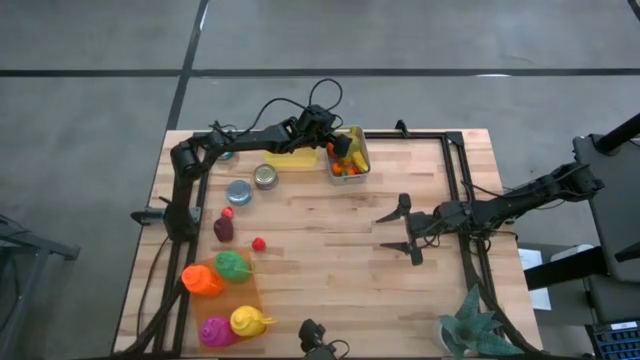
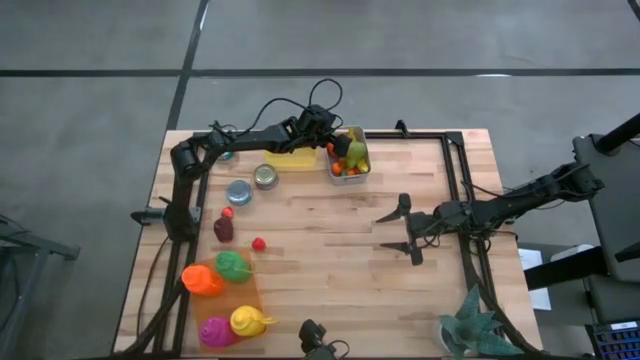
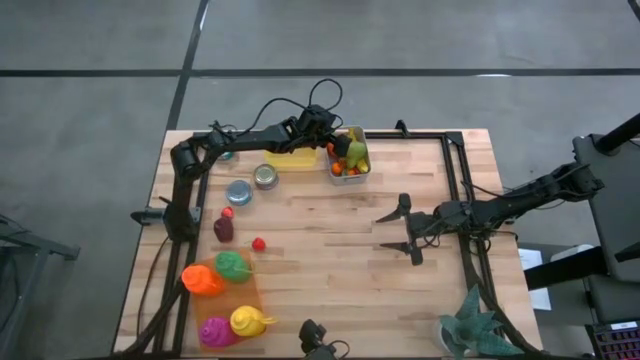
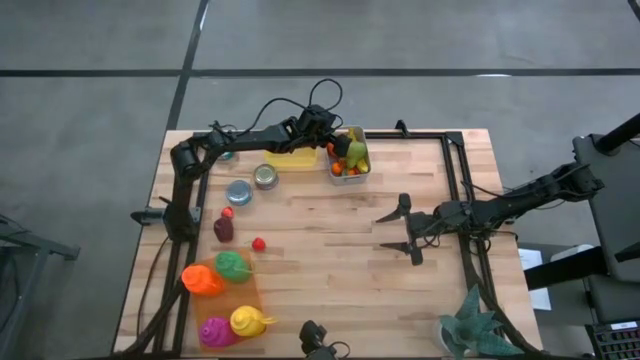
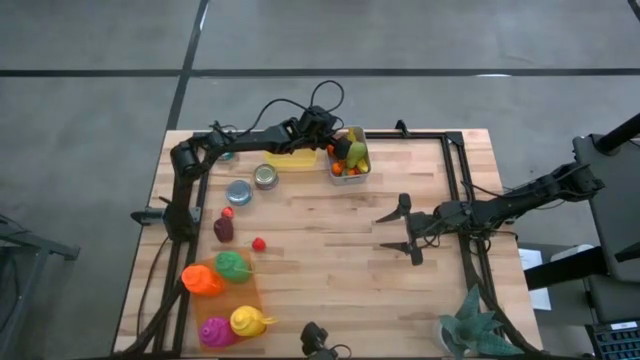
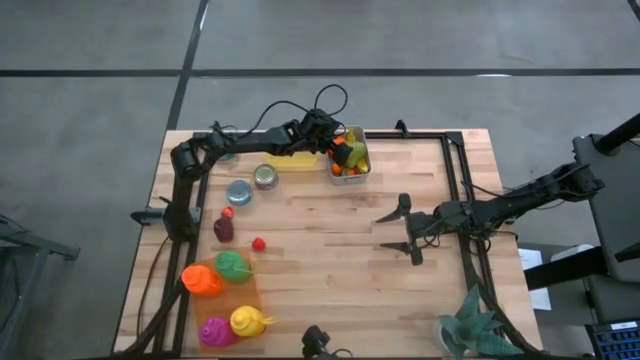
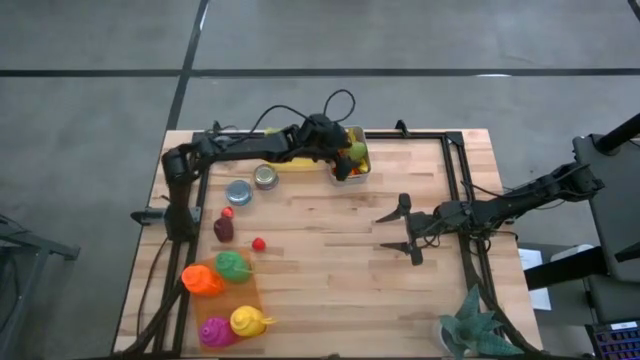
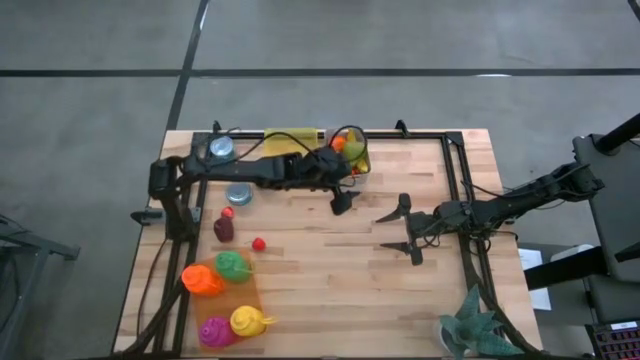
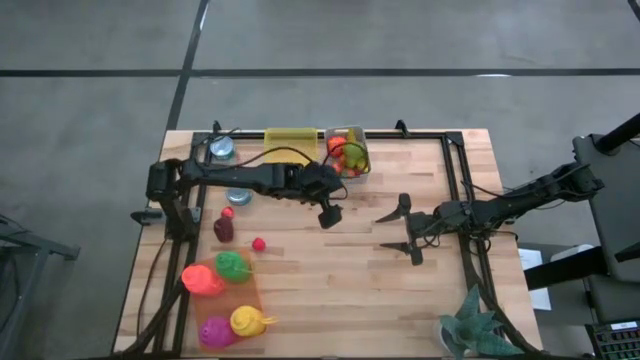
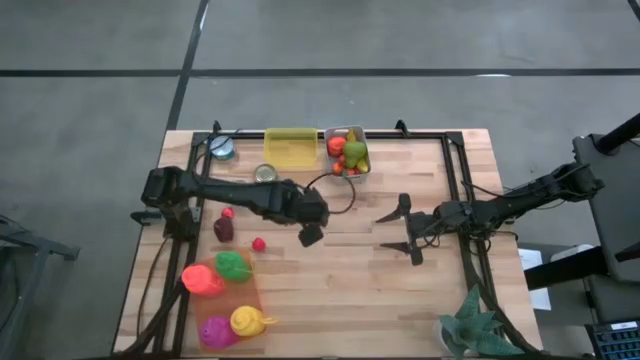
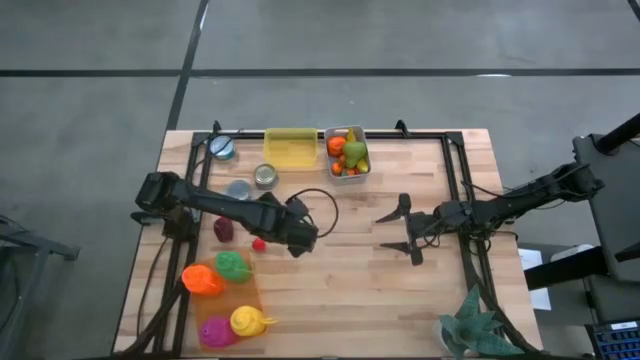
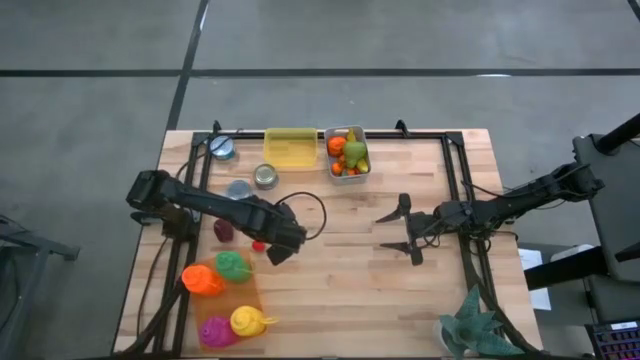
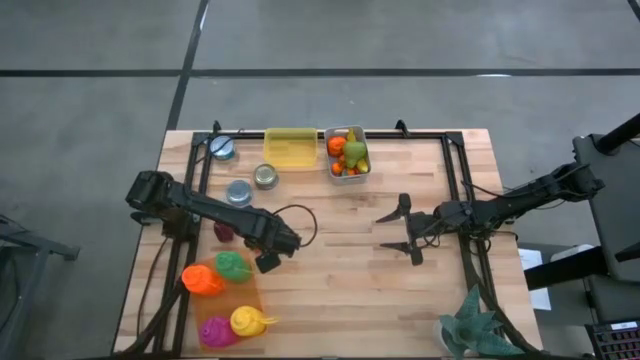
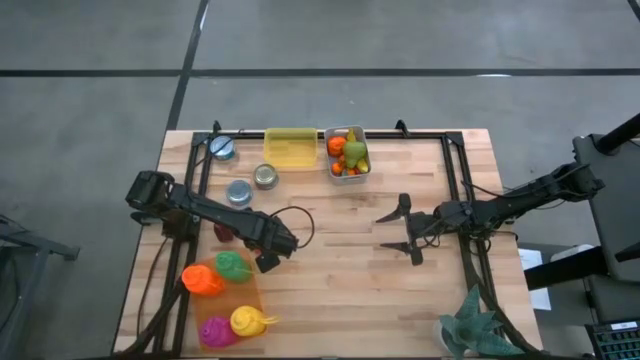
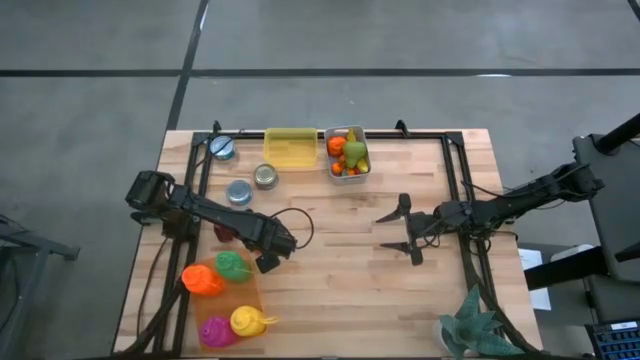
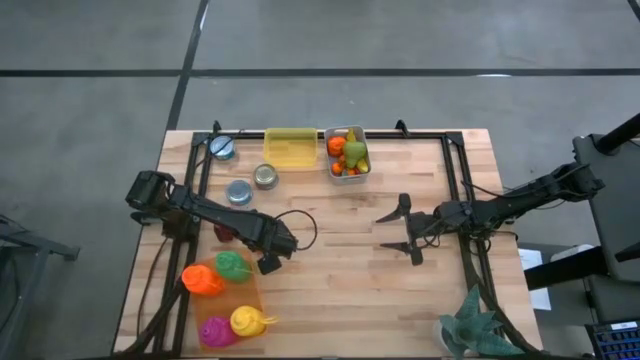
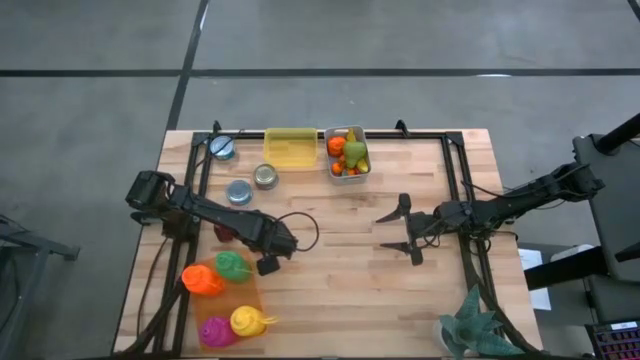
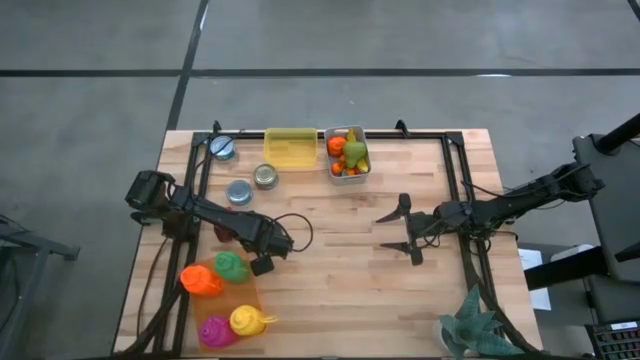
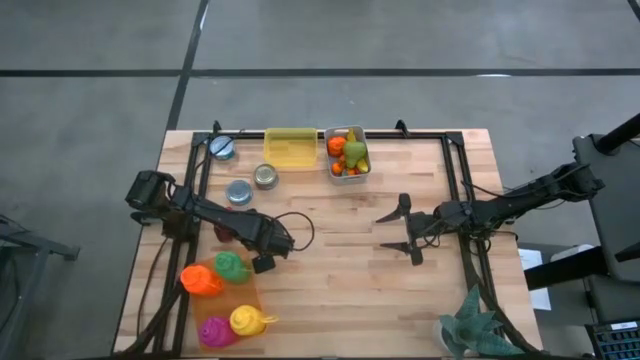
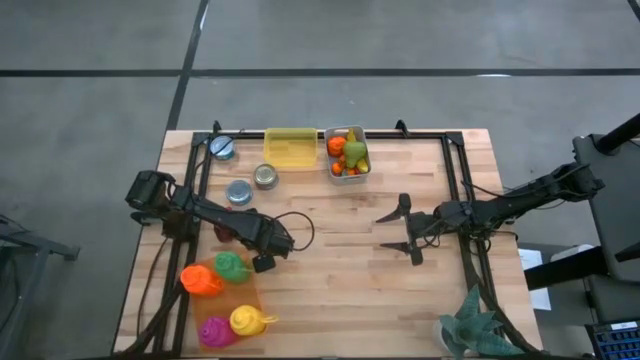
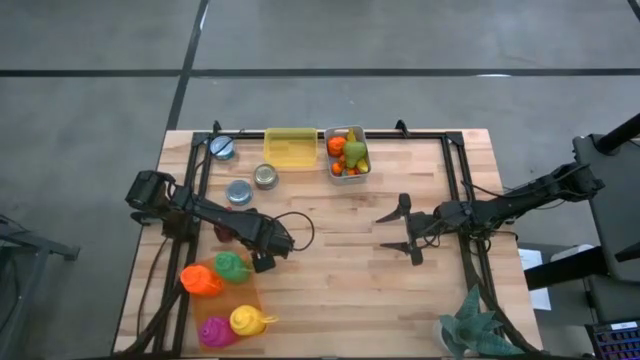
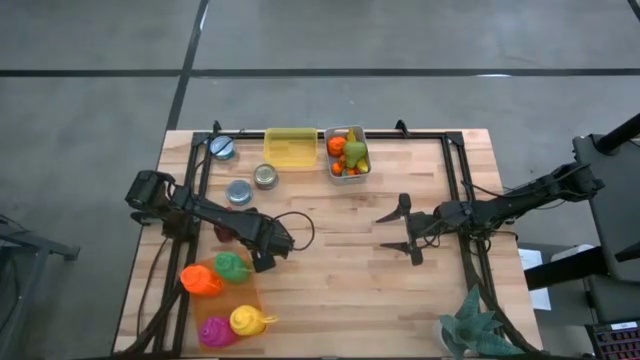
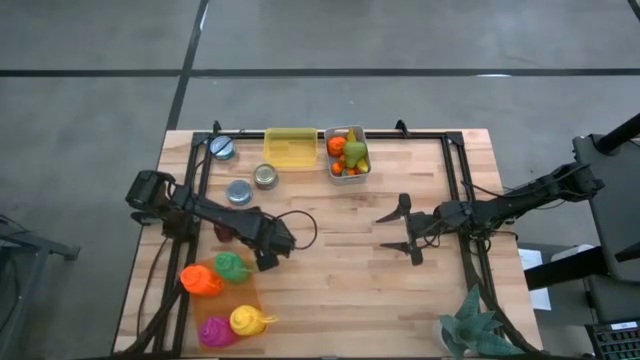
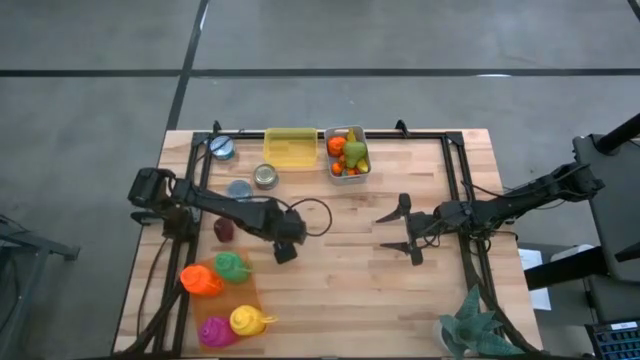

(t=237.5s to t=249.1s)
Task: Pick & Place Food Item
Put the red strawberry into the gray bin

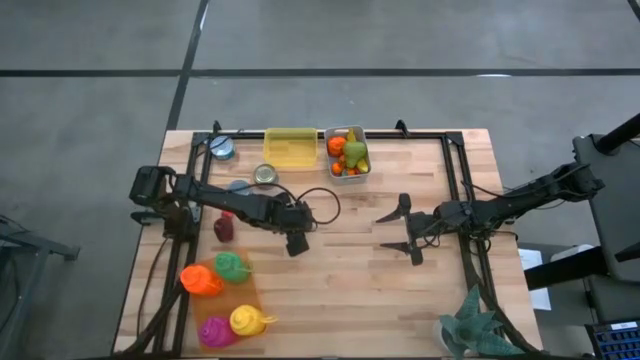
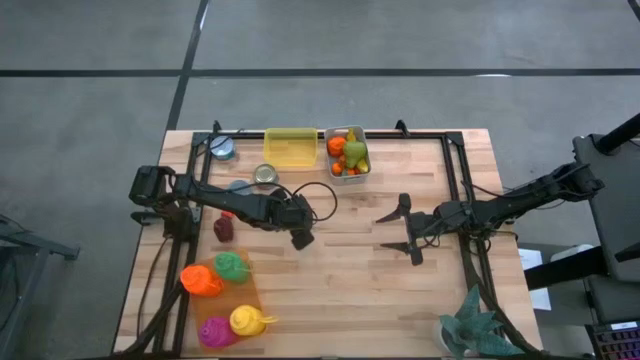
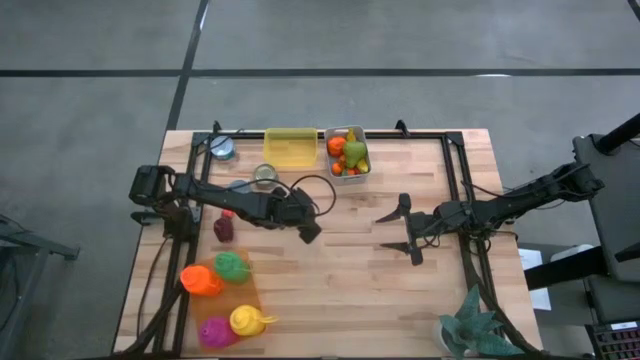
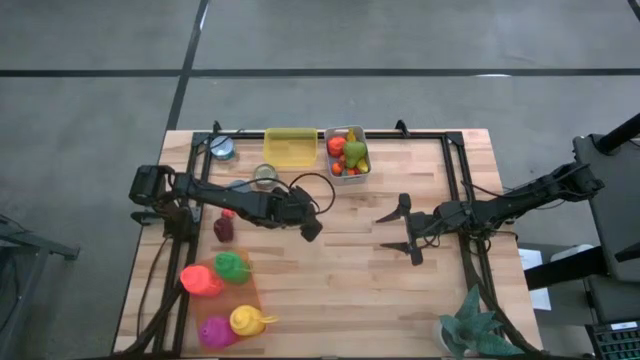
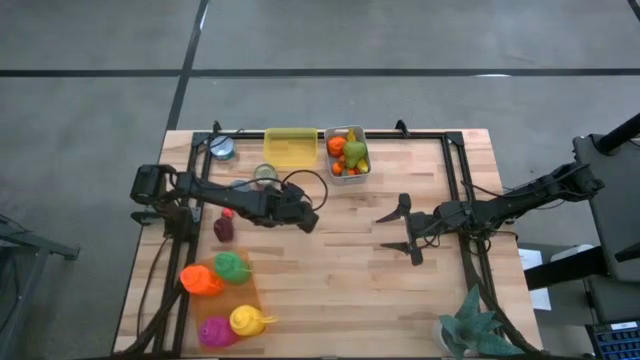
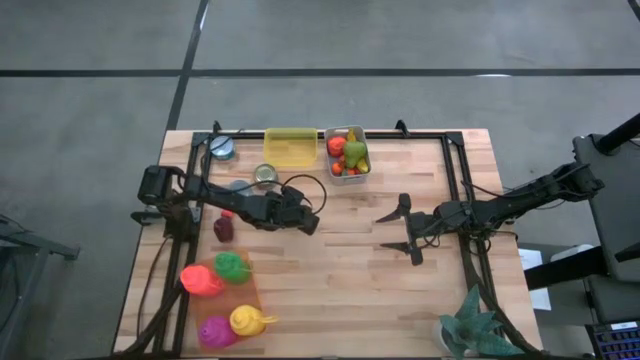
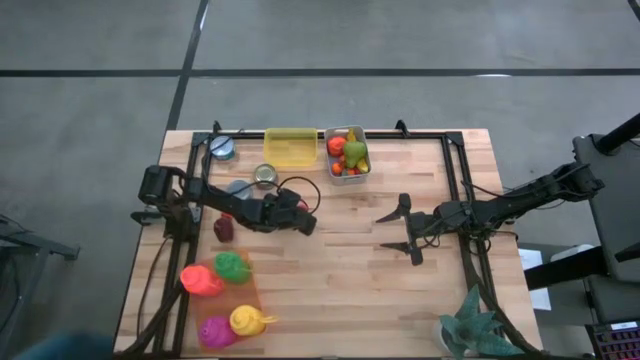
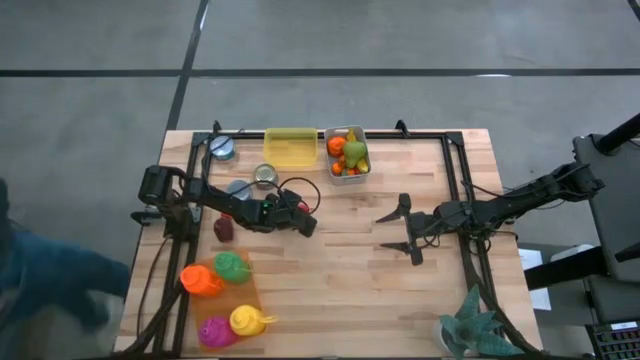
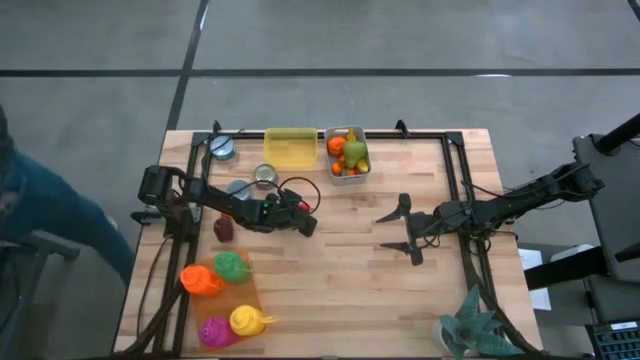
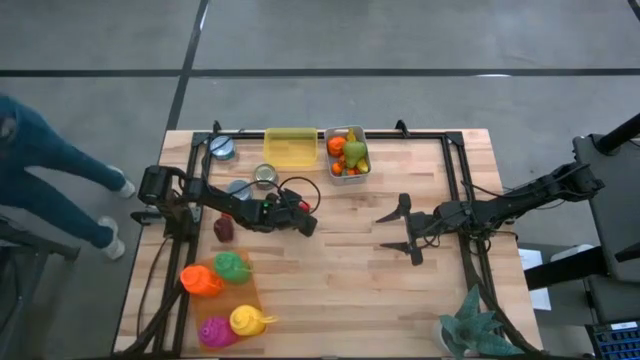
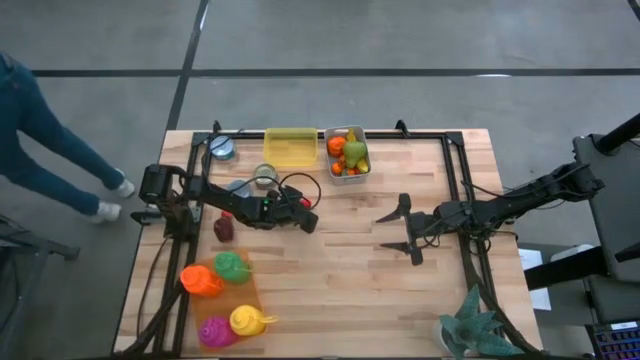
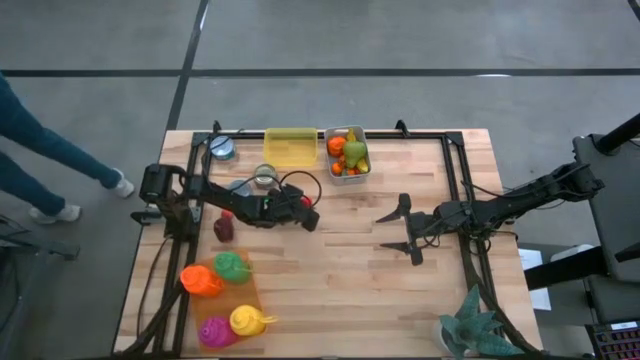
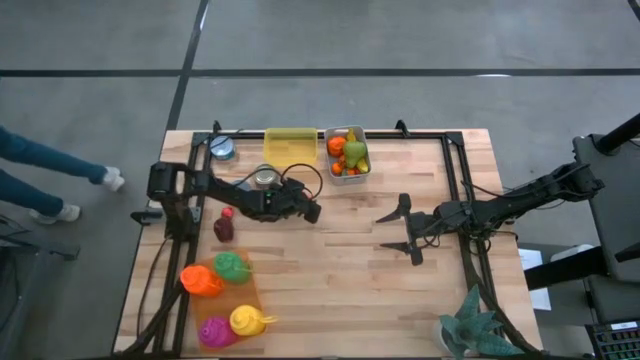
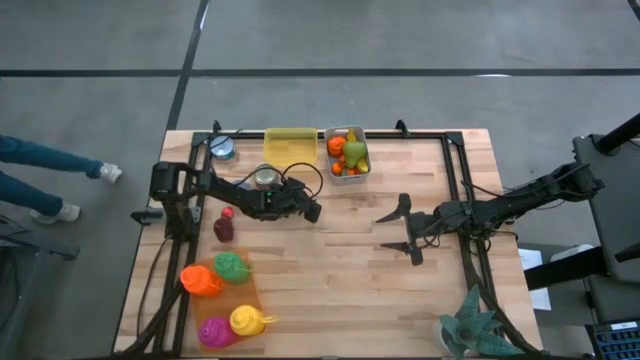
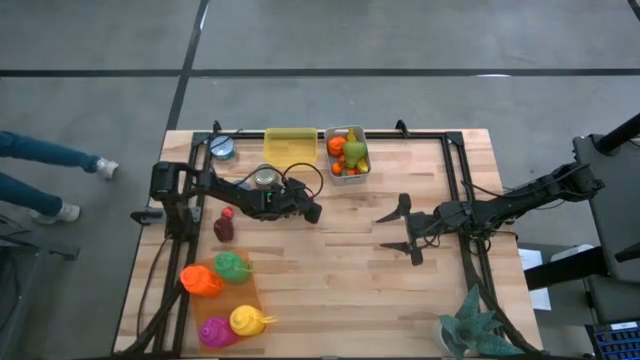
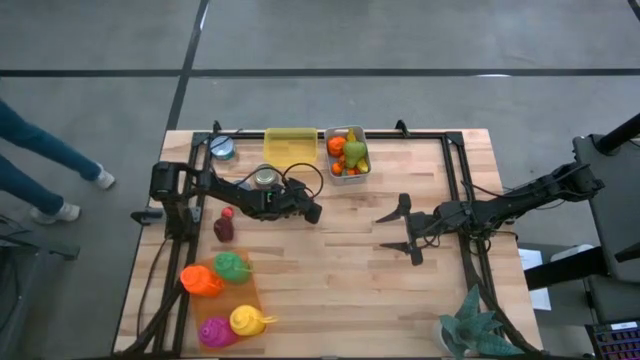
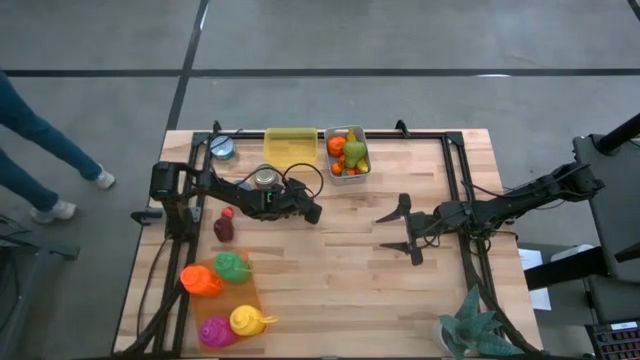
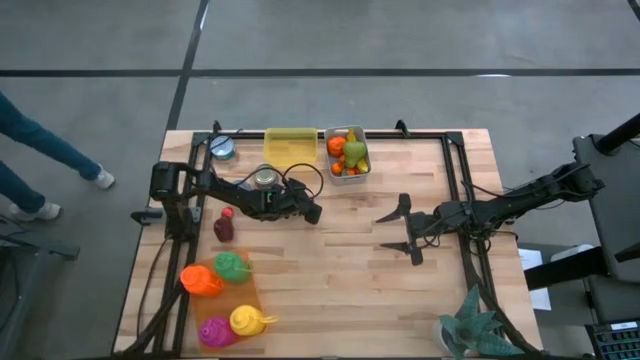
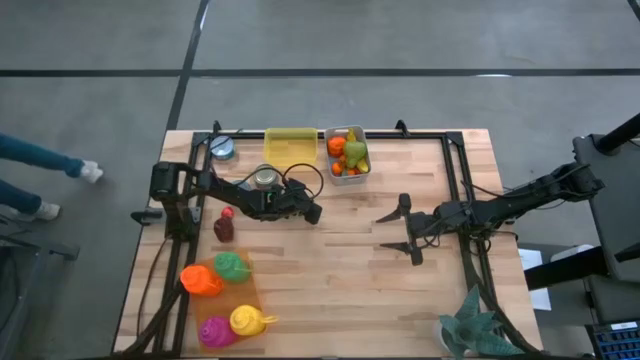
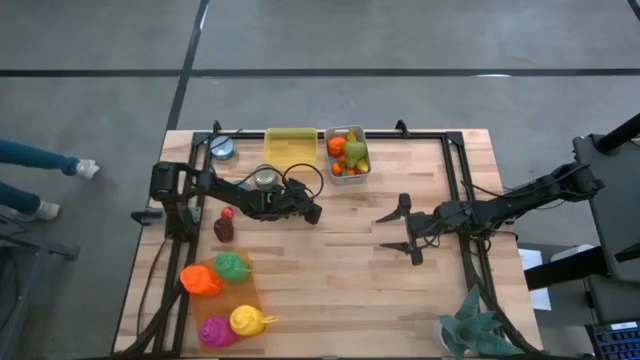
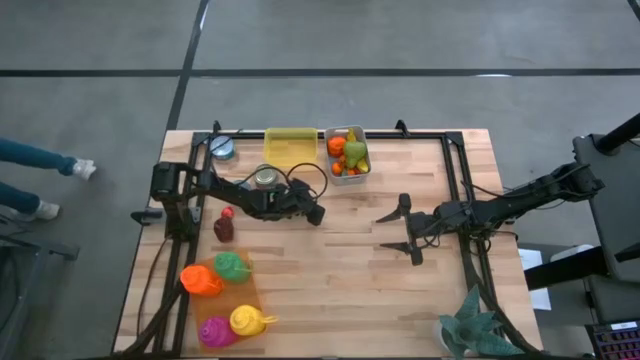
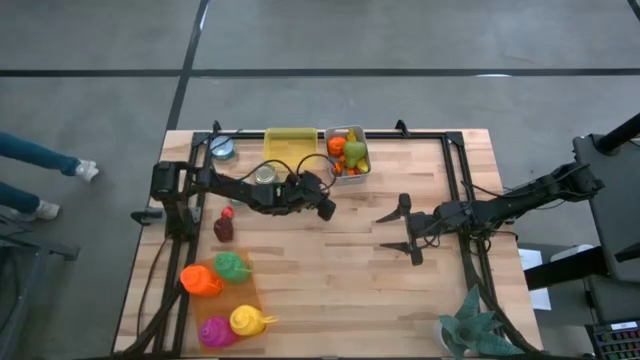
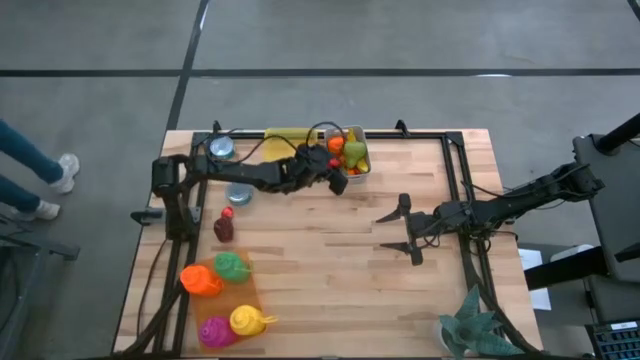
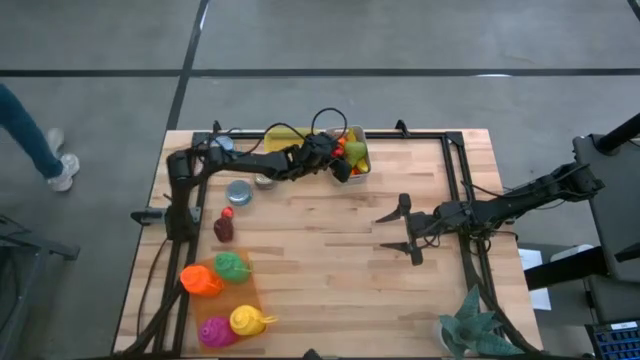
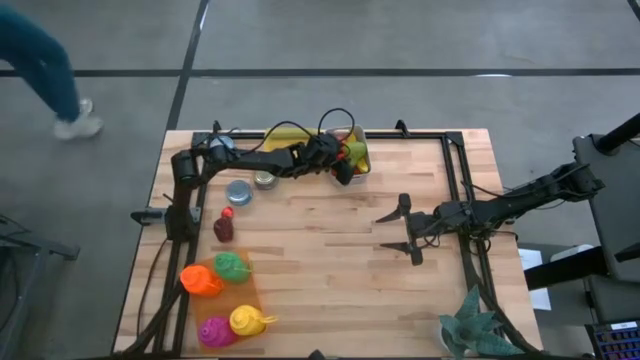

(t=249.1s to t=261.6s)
Put the red strawberry into the gray bin
